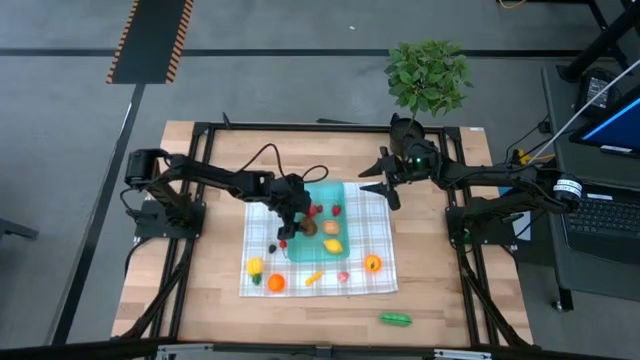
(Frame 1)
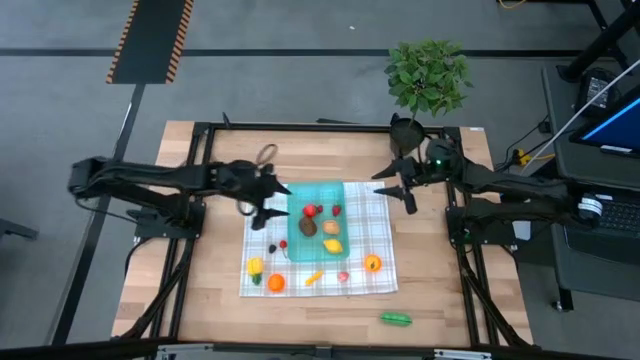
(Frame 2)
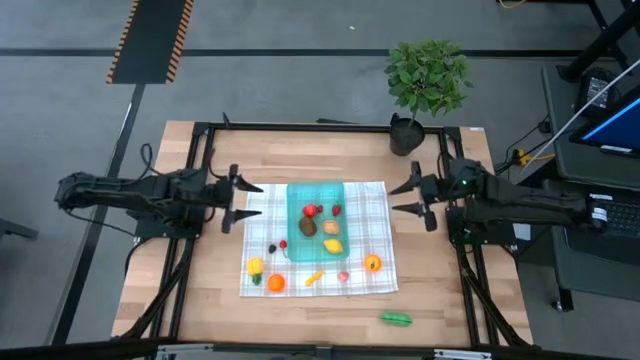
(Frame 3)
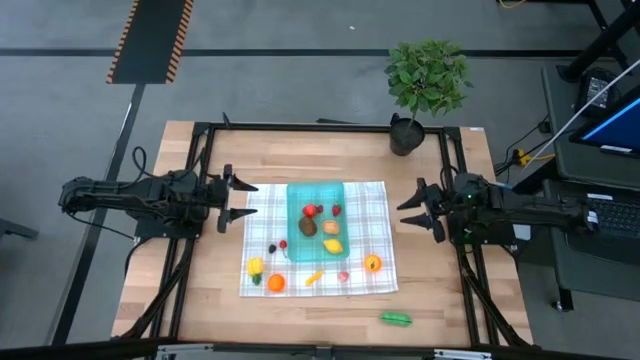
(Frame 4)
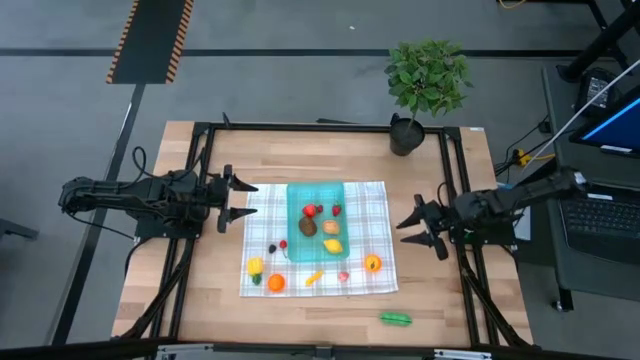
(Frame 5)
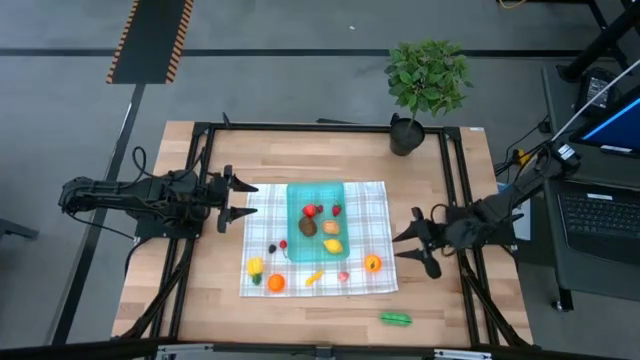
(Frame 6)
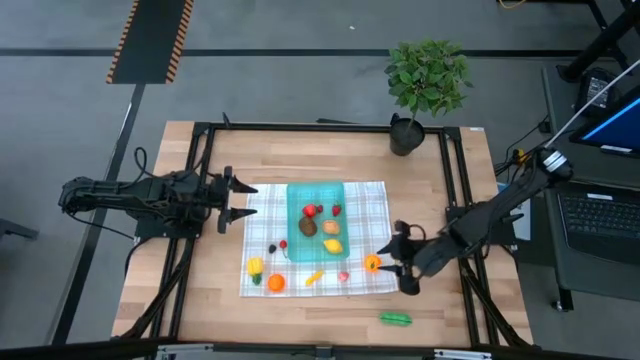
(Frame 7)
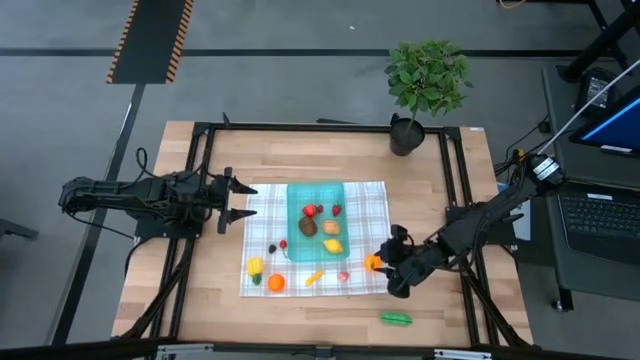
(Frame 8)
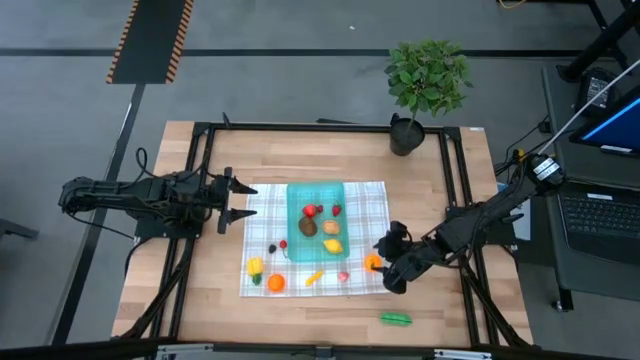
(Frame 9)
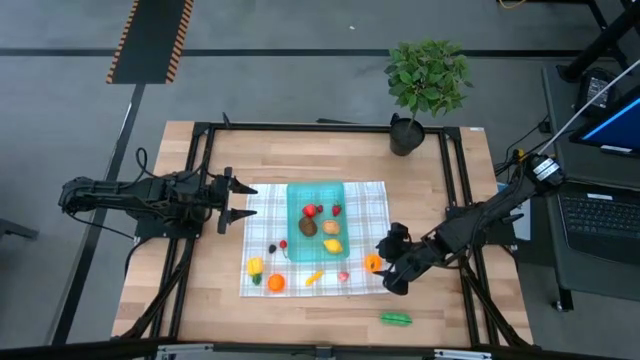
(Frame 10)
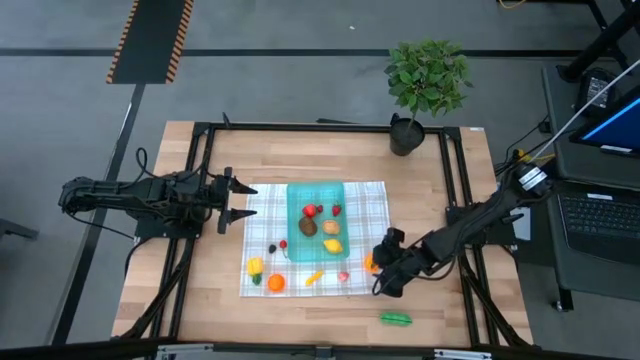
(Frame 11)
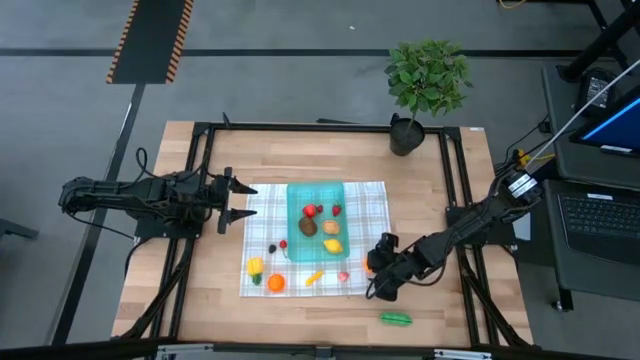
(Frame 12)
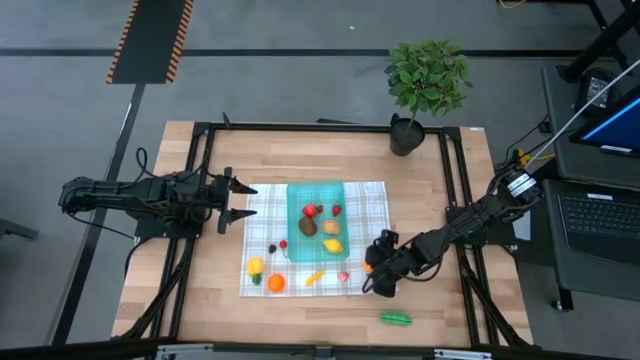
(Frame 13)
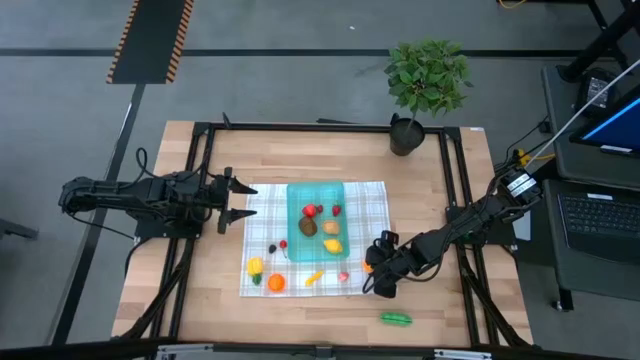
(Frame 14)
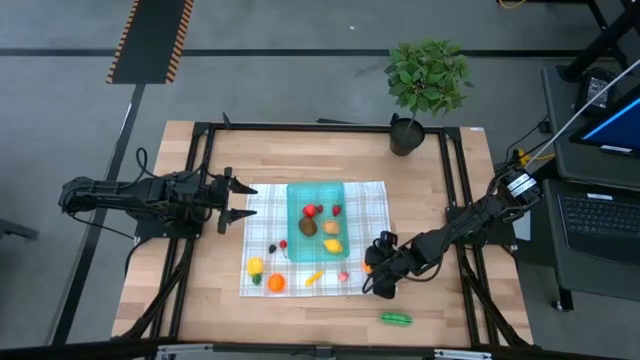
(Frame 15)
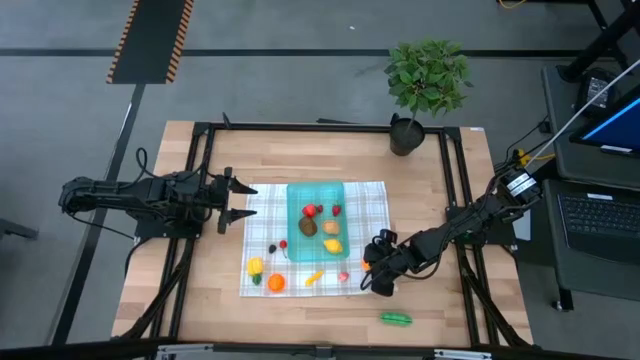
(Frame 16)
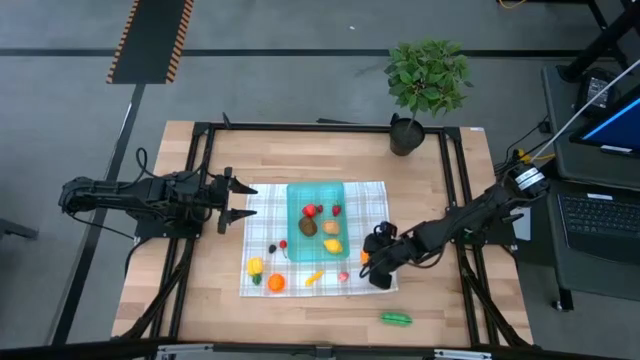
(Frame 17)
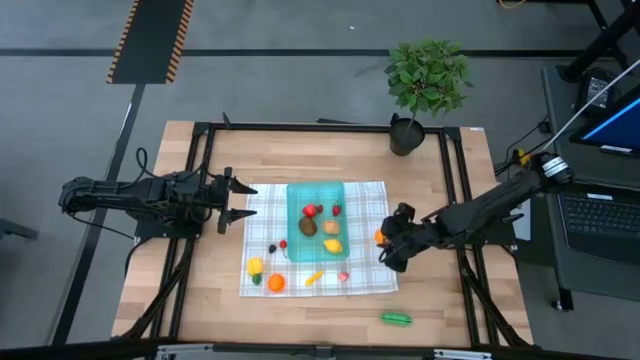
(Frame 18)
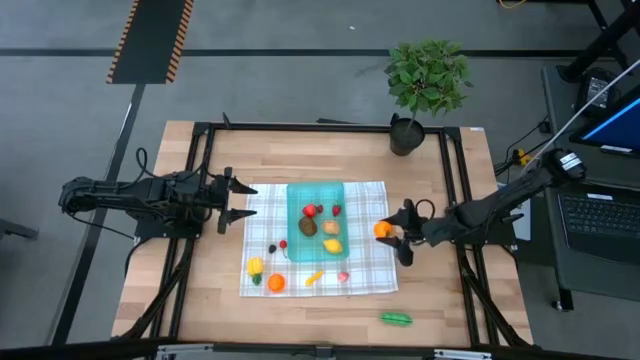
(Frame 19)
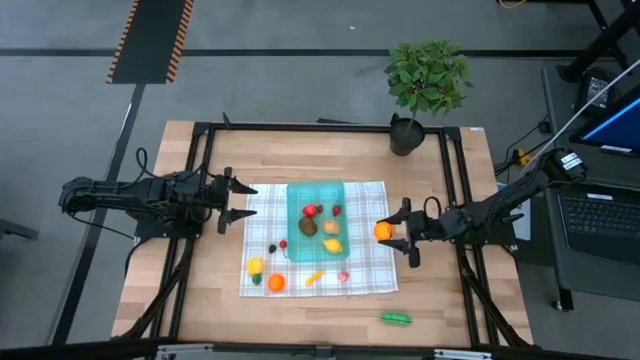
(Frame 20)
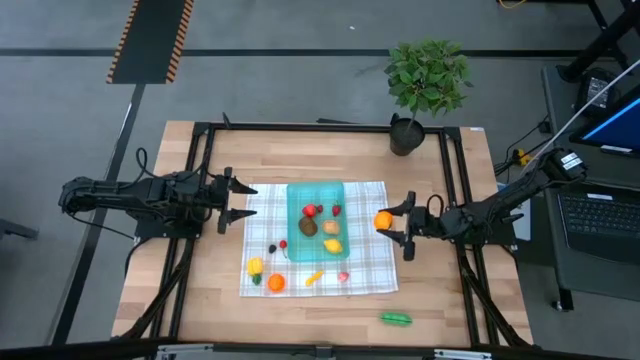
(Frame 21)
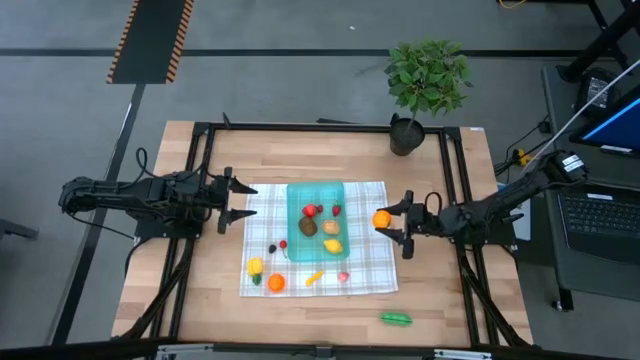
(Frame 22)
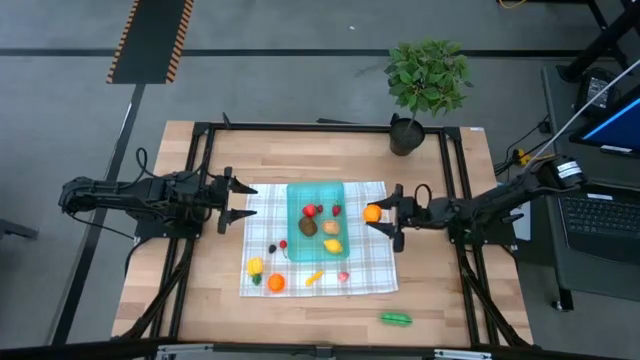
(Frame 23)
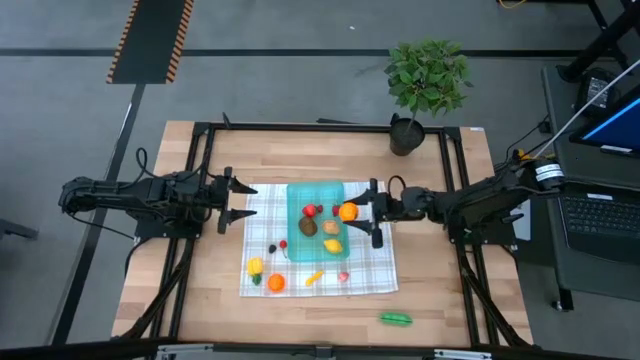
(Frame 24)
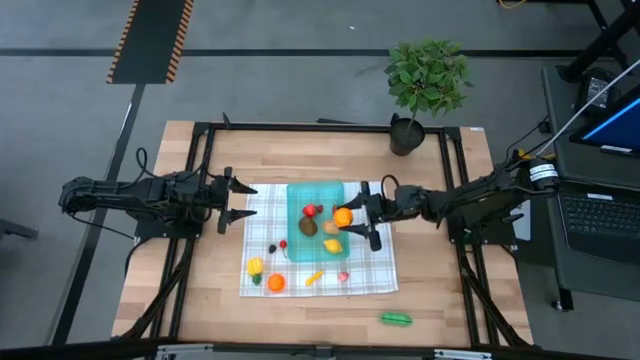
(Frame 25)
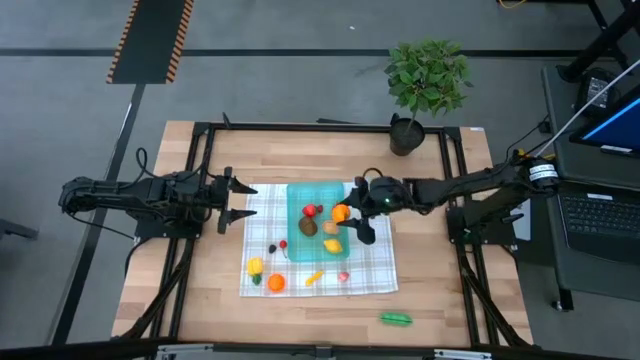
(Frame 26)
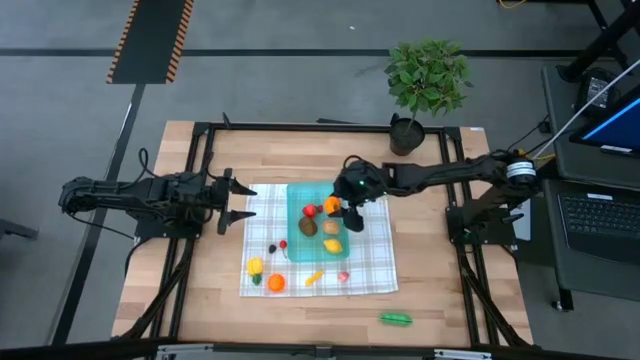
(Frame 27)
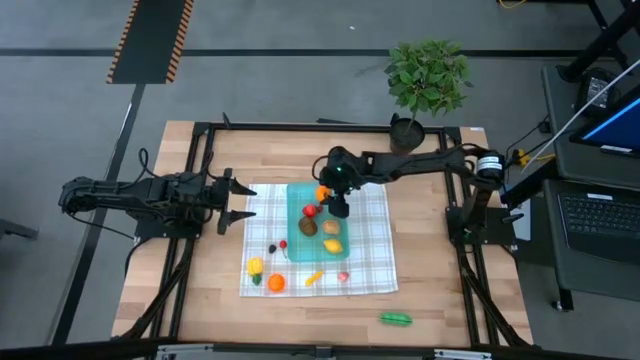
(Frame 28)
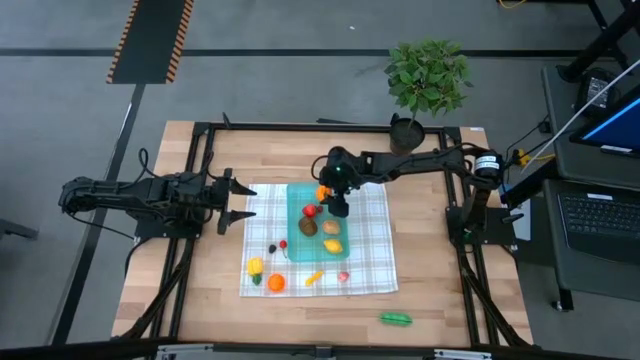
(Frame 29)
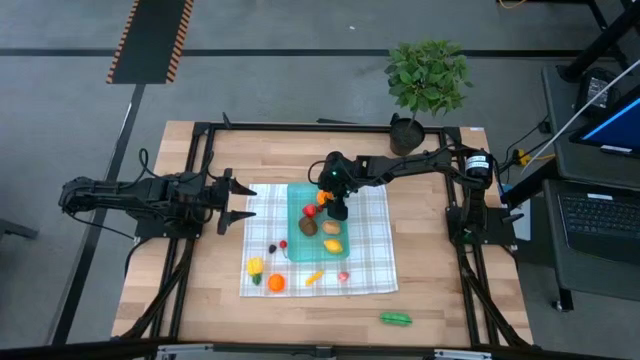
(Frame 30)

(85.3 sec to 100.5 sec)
Task: Pick and placing Produce into tupperware
Put the orange into the blue bin

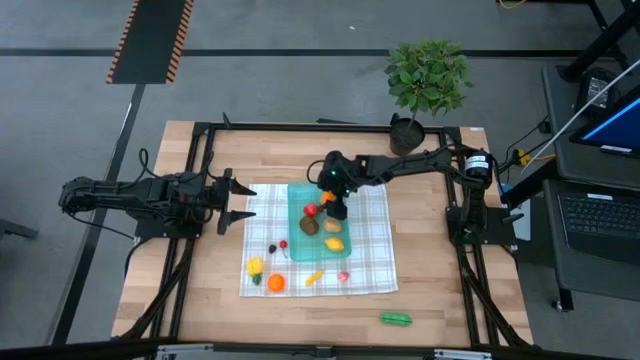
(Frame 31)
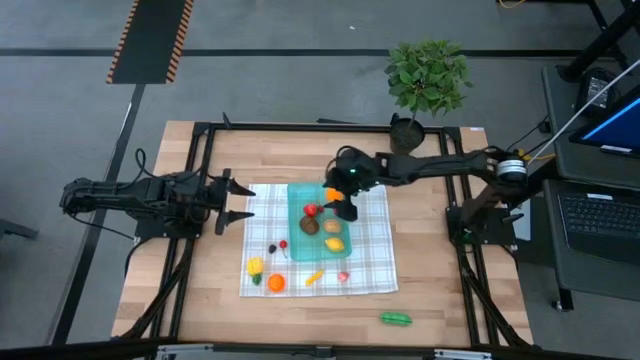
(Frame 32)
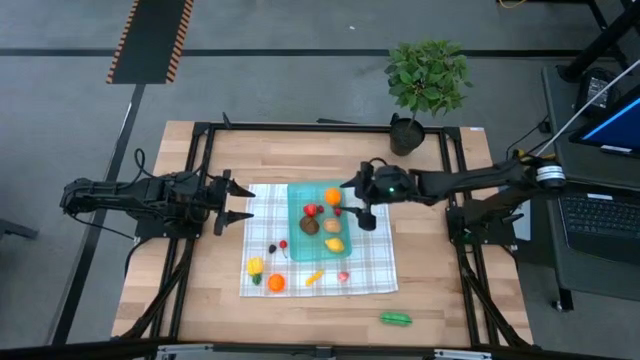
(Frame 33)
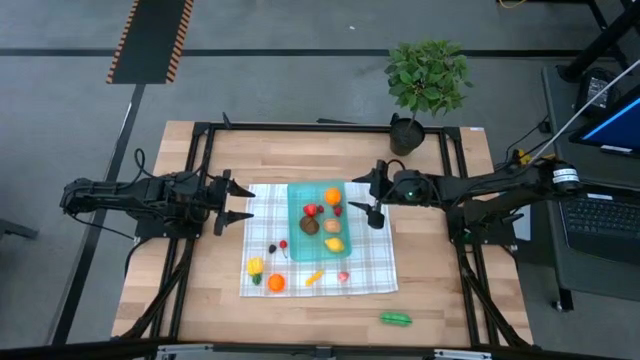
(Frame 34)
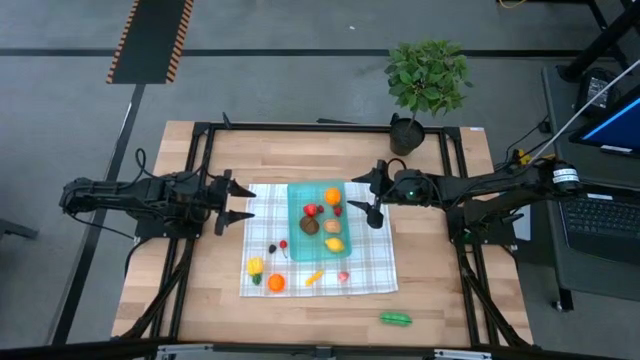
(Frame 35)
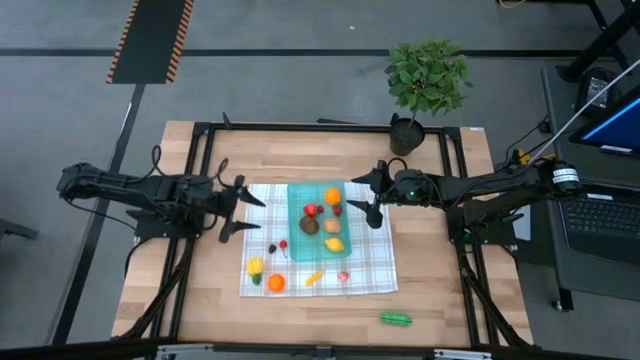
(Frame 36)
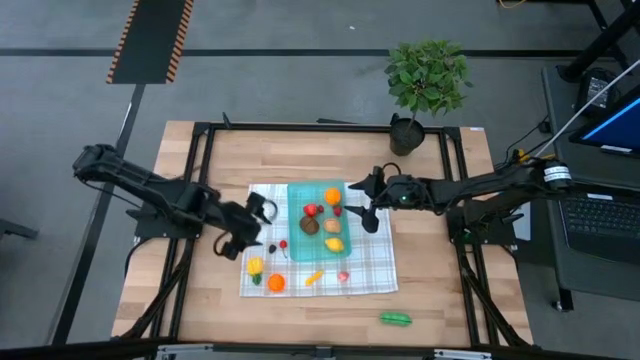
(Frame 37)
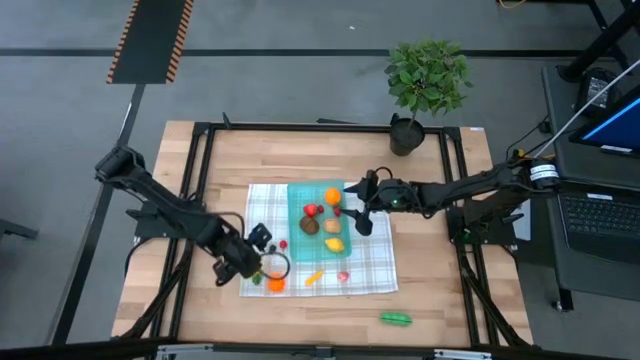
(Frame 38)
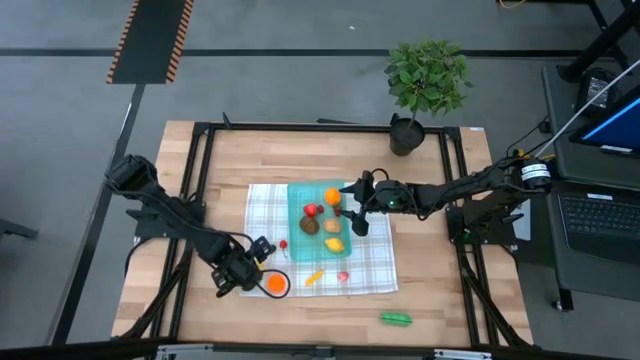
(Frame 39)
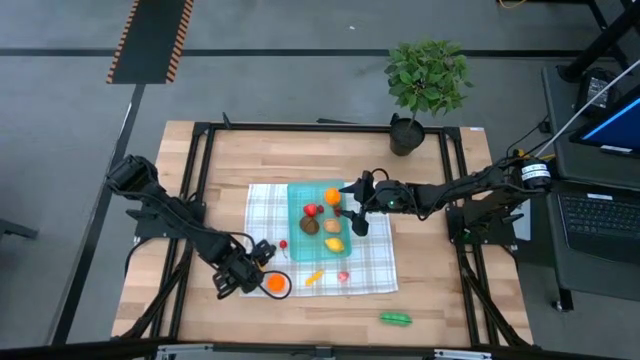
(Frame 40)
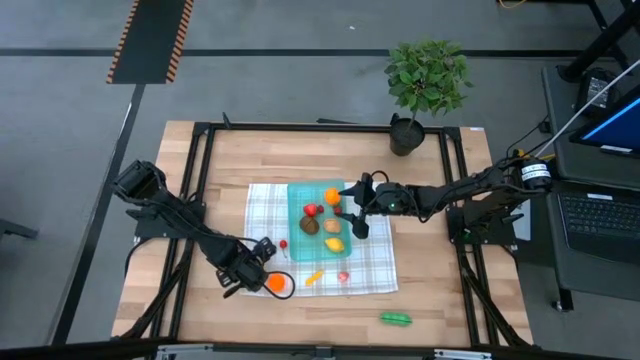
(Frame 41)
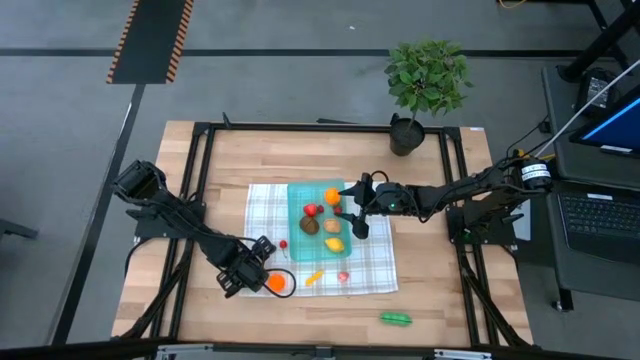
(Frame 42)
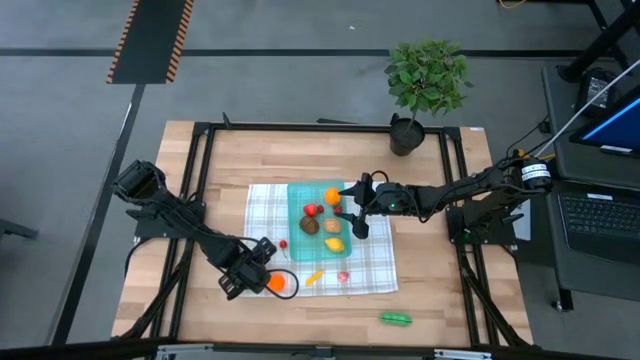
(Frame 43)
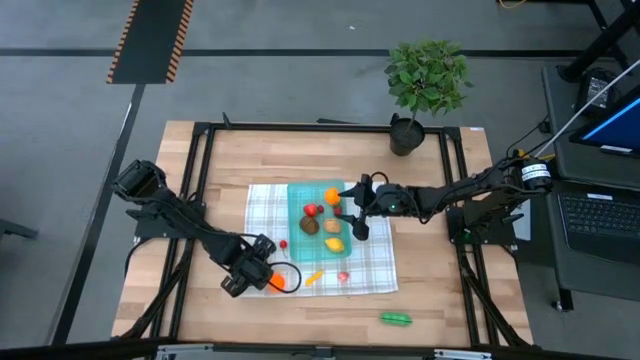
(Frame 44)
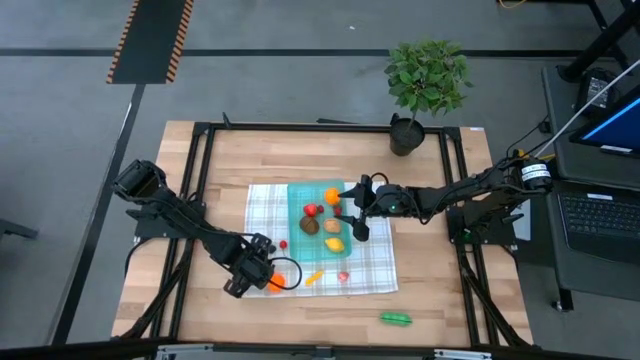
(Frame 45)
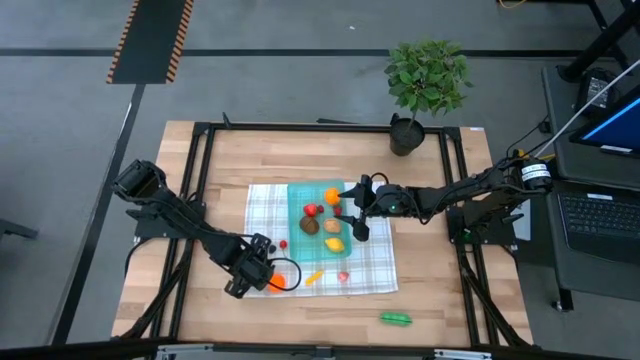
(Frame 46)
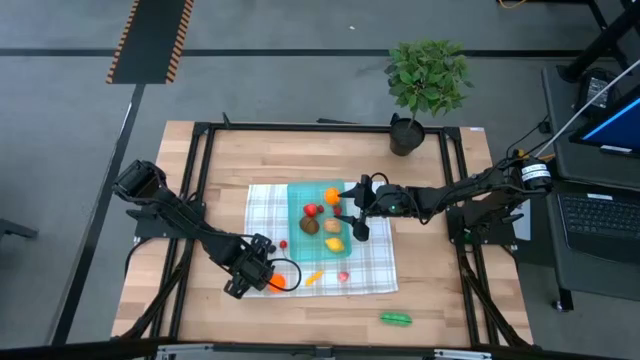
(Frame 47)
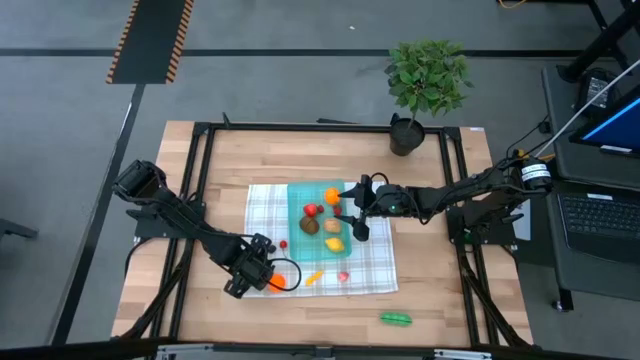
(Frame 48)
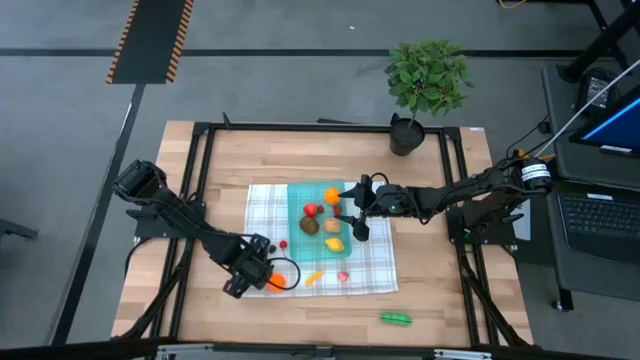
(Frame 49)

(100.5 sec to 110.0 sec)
Put the pineapple into the blue bin
